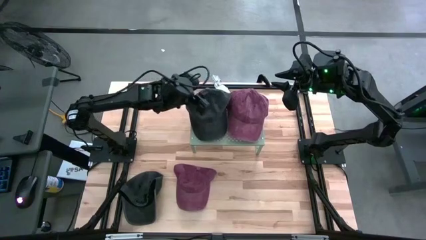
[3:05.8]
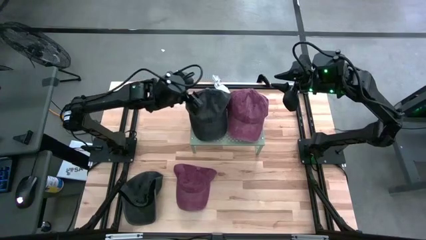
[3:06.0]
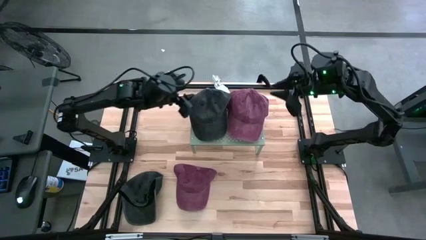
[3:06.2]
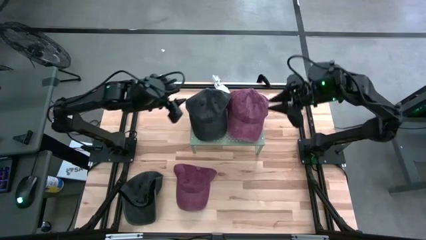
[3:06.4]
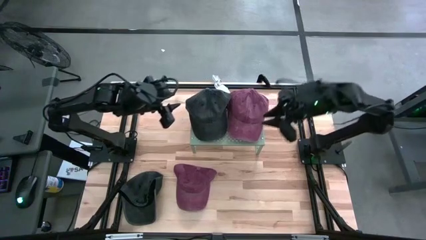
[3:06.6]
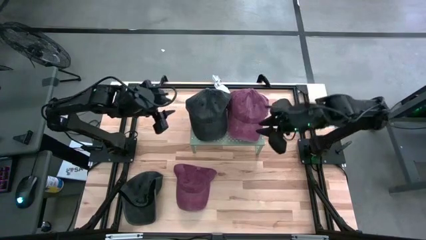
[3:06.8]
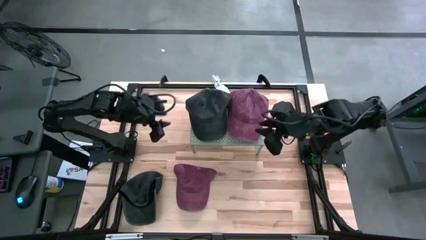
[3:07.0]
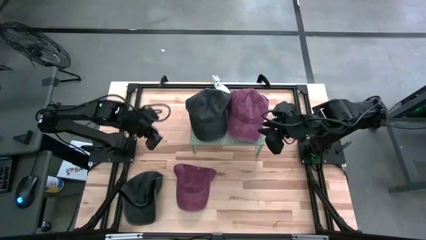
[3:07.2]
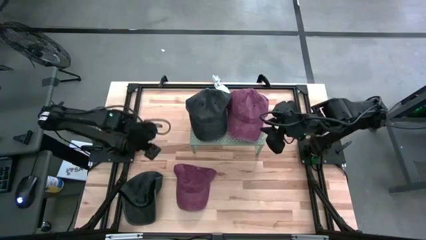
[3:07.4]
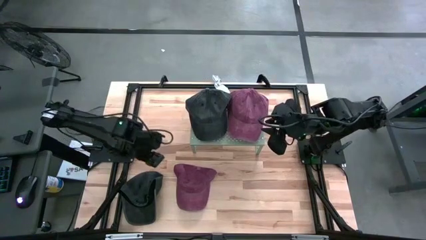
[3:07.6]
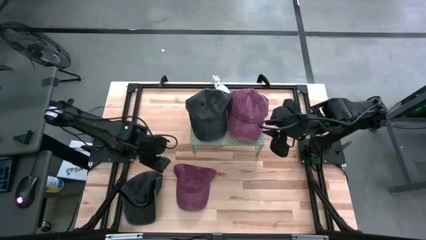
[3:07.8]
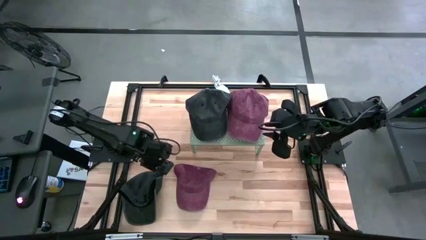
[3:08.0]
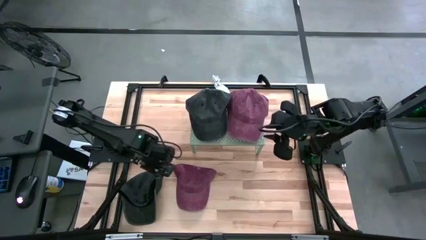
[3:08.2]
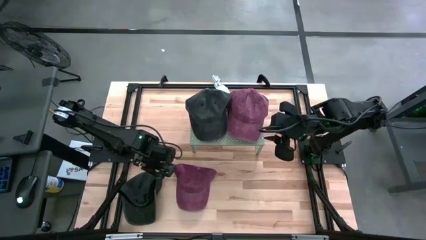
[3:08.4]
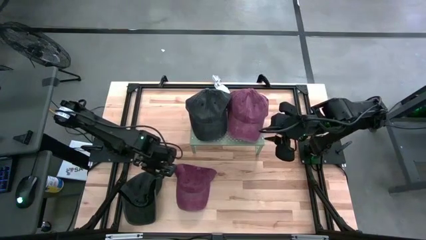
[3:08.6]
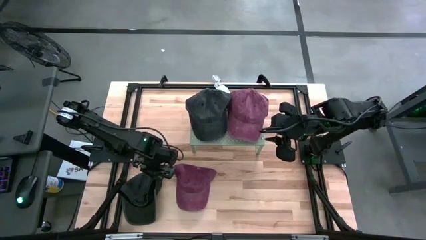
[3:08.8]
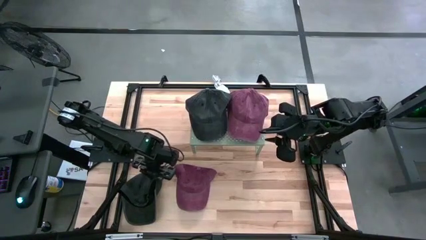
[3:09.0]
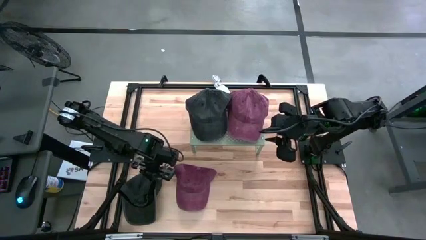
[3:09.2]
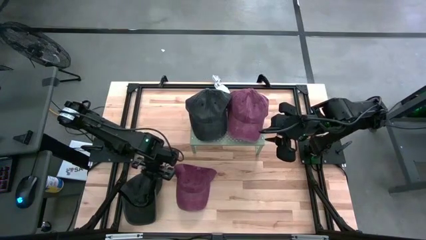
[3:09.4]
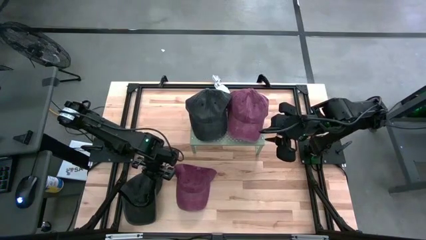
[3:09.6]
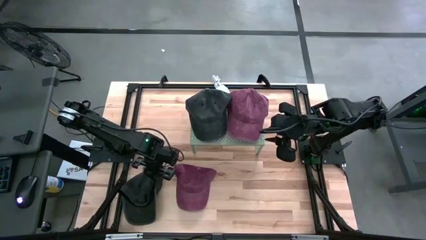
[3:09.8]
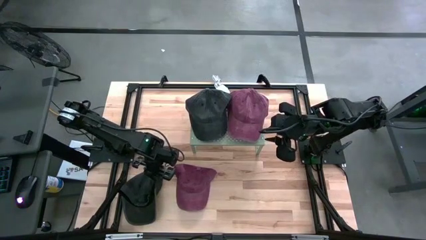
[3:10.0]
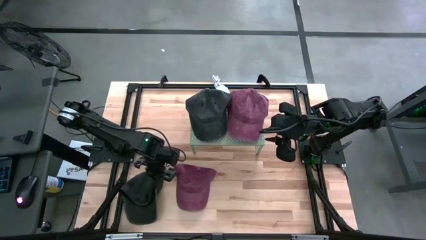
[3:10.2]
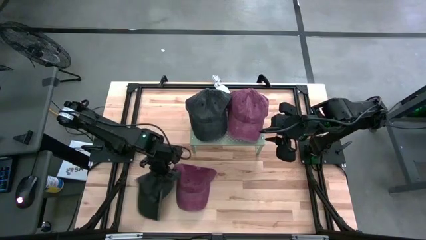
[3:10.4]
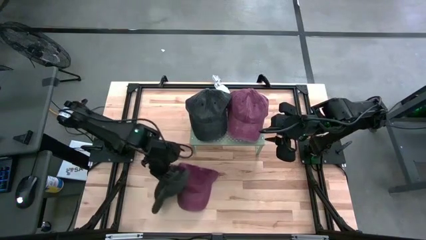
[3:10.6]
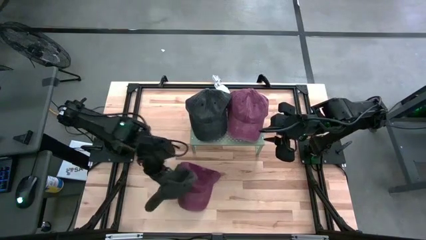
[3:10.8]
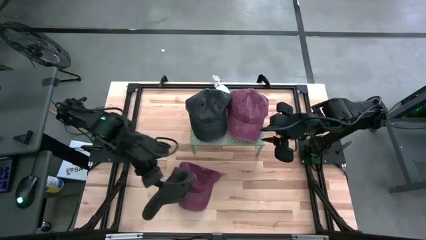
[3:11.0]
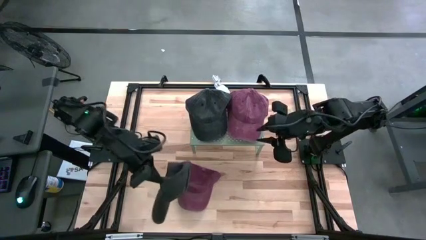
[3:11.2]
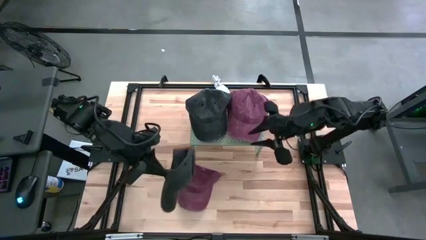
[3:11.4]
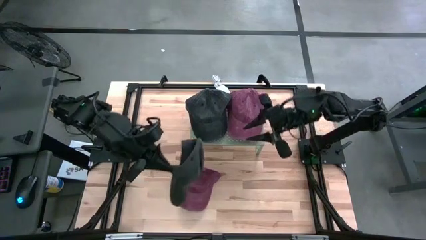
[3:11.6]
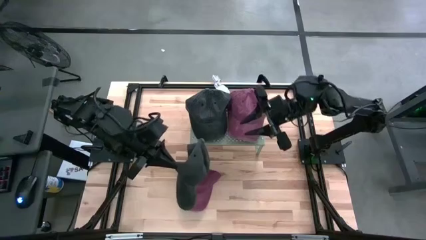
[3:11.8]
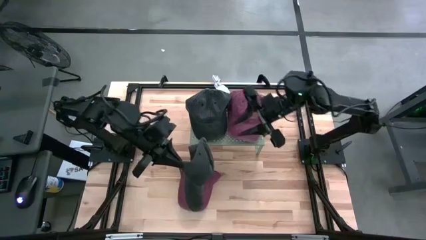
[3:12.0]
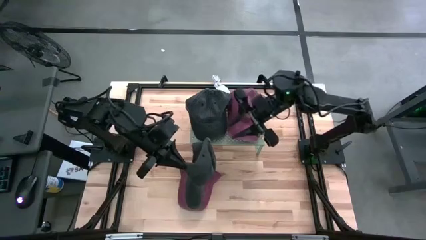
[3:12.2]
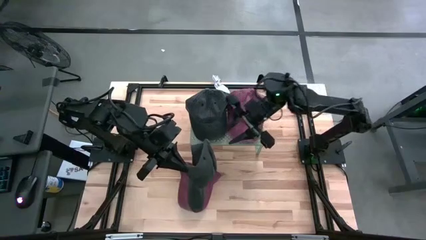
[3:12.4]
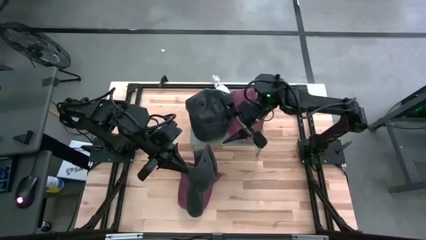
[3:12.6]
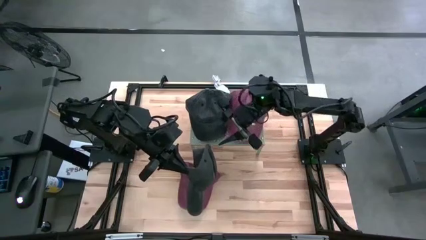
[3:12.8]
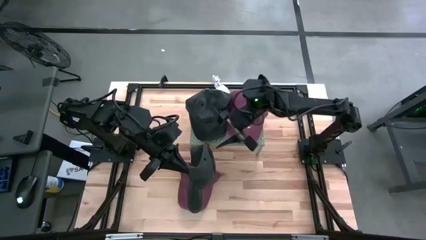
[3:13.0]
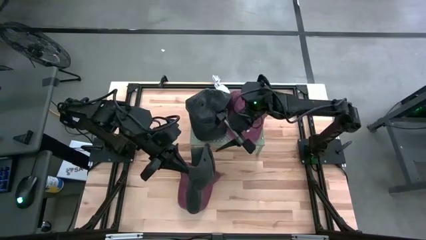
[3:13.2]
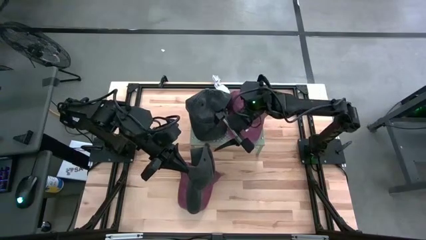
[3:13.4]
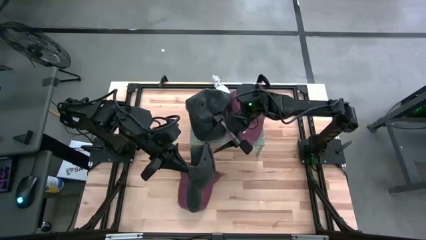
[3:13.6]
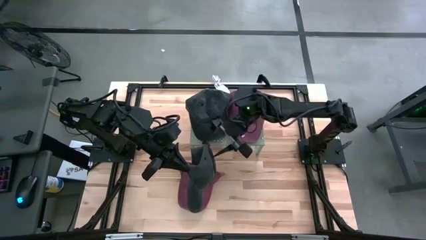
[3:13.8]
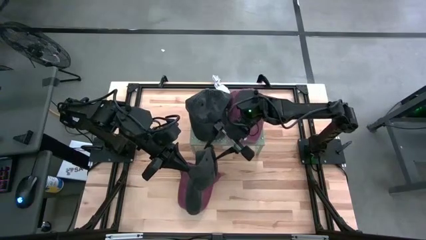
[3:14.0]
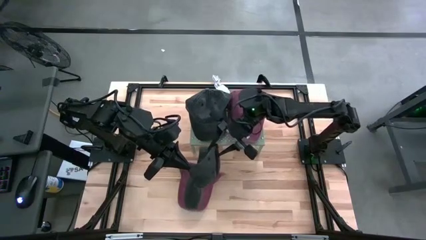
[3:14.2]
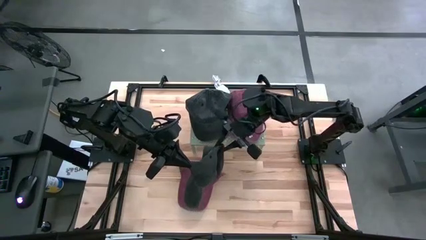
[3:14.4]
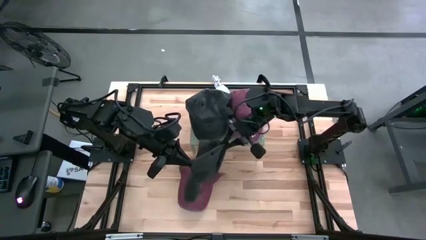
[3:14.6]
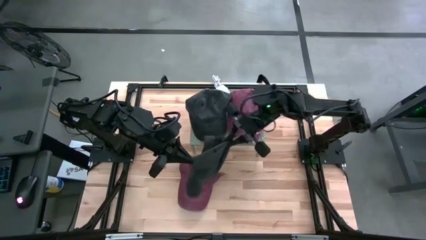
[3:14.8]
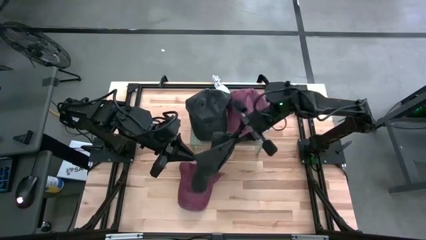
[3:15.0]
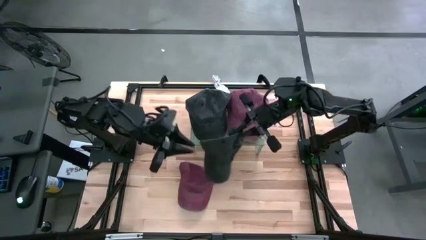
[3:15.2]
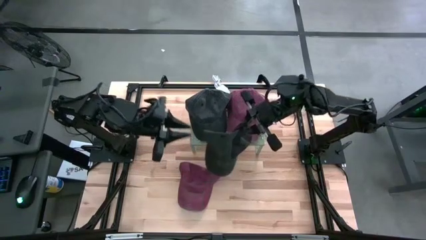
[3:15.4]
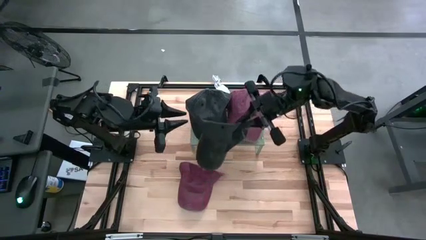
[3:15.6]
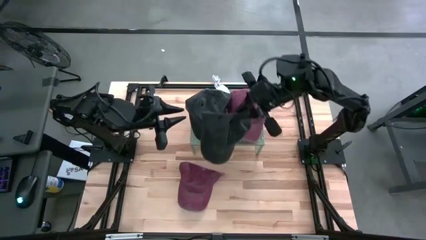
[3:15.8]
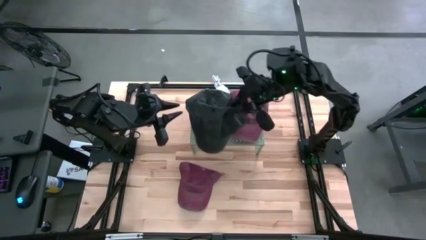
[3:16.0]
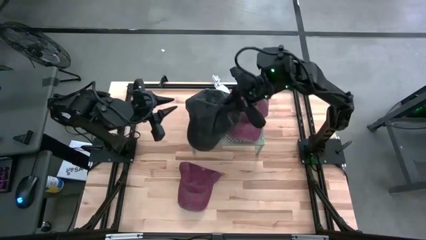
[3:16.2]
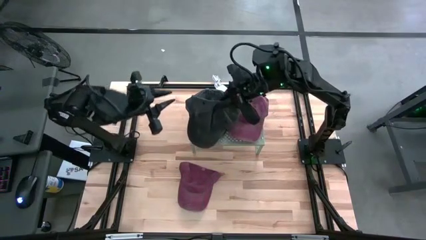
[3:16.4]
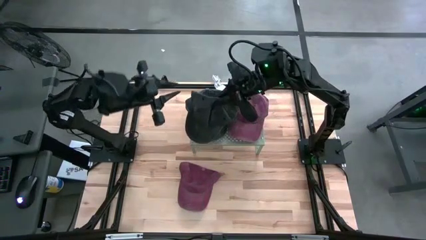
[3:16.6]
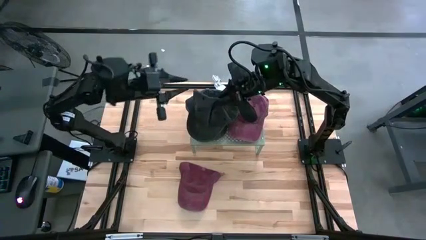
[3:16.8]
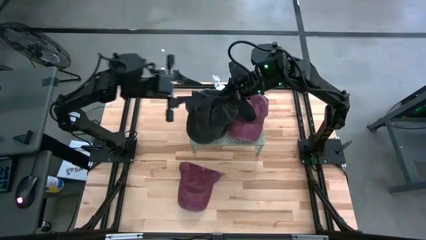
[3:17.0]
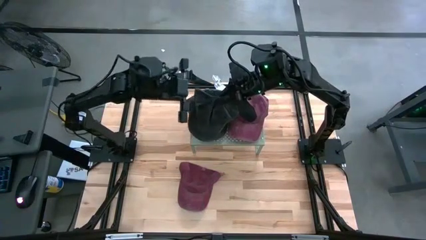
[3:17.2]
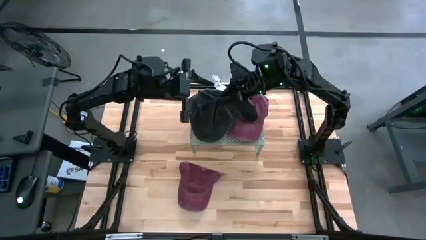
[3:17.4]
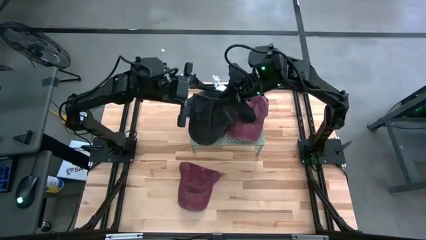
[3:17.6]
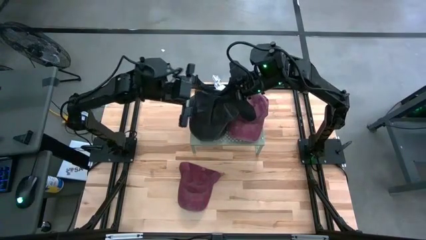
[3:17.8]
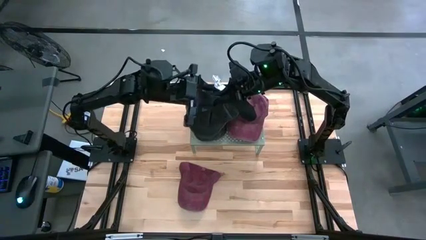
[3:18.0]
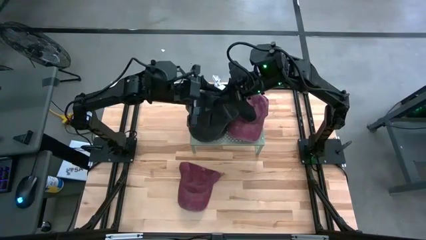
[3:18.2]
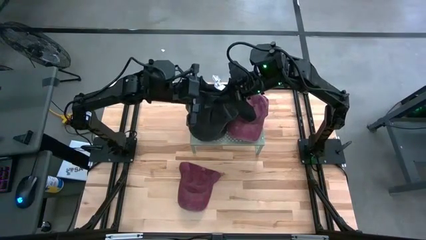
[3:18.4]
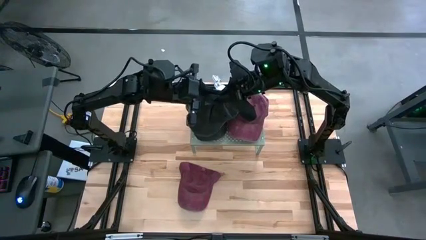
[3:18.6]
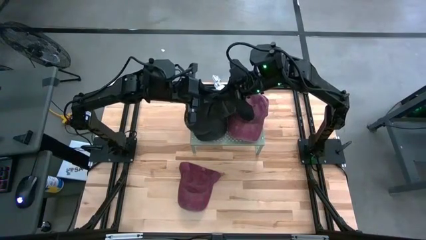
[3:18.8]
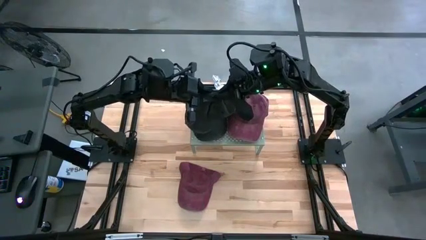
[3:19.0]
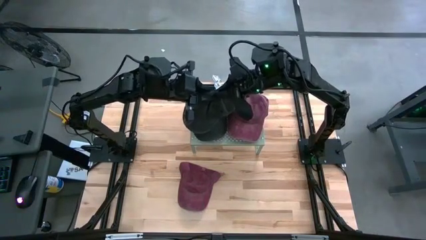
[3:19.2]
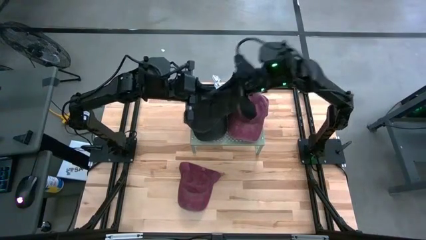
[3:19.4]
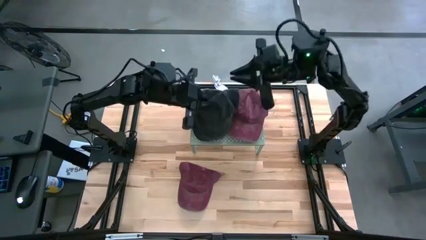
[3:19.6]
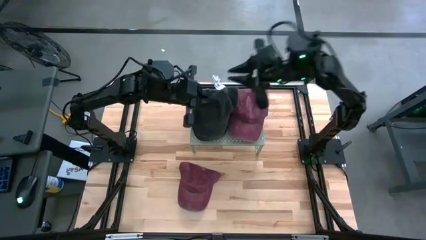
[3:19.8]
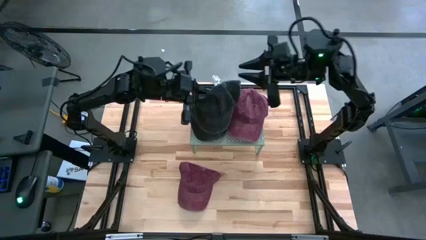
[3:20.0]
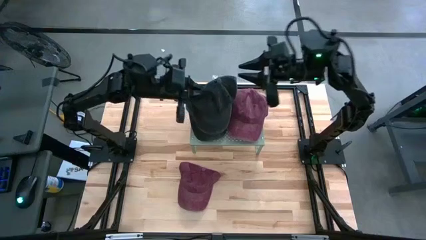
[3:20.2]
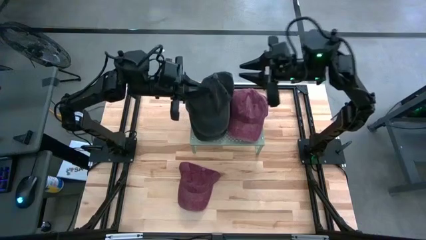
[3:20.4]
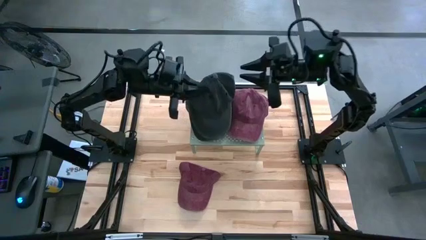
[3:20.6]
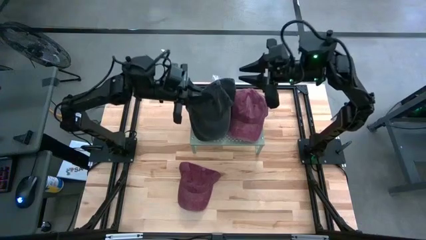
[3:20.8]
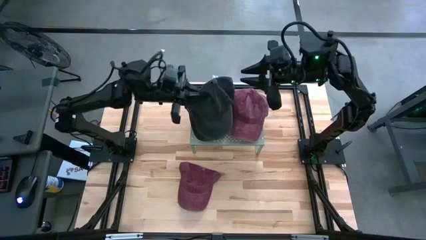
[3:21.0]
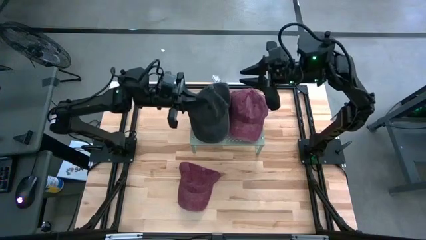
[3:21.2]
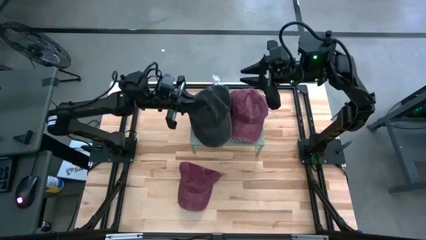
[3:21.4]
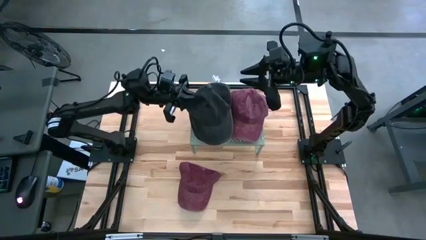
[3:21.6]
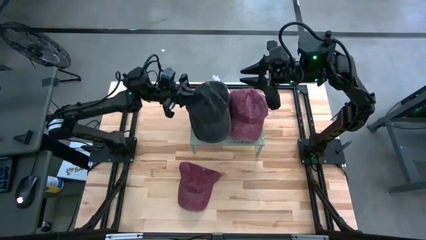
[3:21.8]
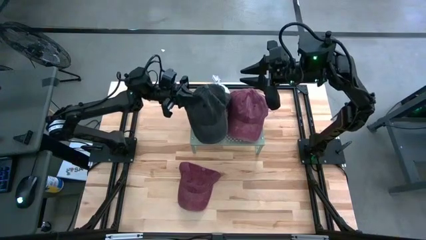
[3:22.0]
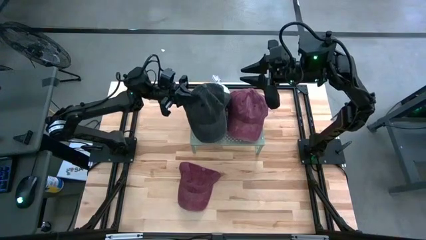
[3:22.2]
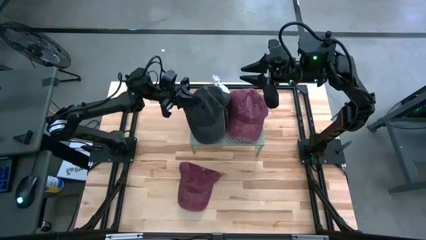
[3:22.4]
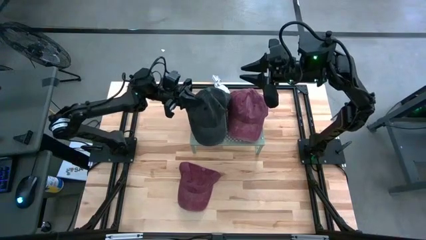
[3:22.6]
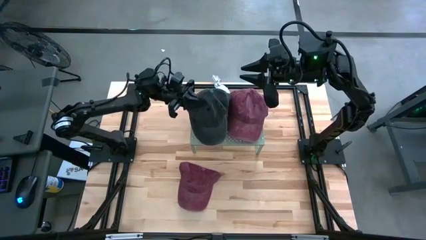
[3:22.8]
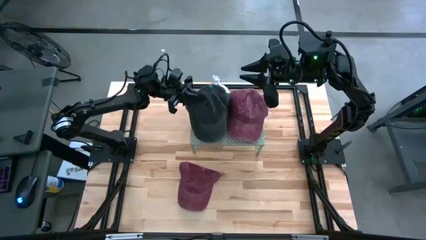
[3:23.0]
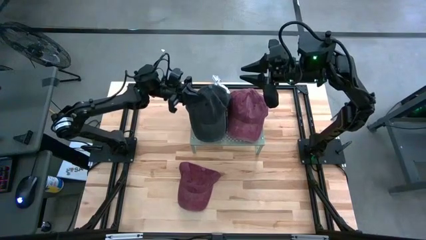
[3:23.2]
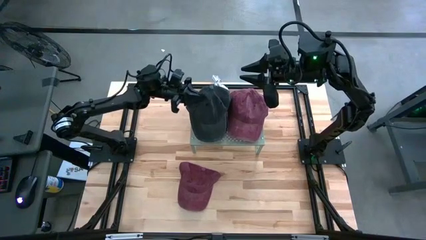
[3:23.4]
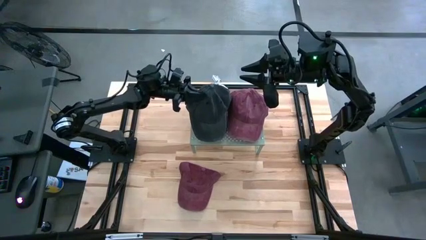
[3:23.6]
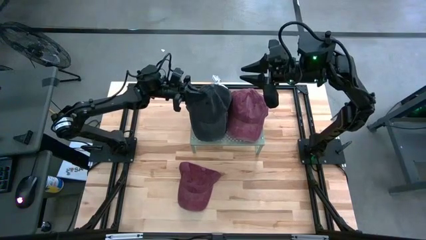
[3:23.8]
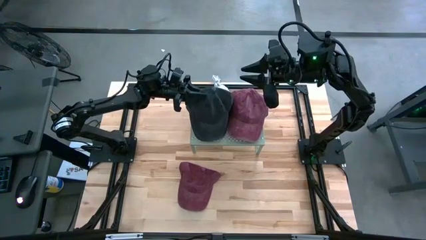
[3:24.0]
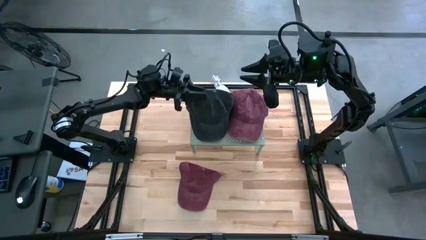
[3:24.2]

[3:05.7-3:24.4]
Task: Pick & Place hat
Stack the black cap on top of the black cap on the shelf
